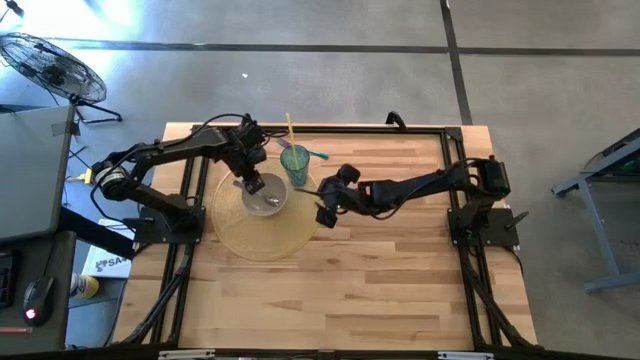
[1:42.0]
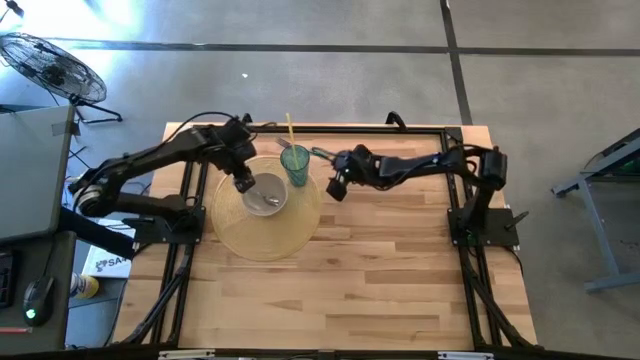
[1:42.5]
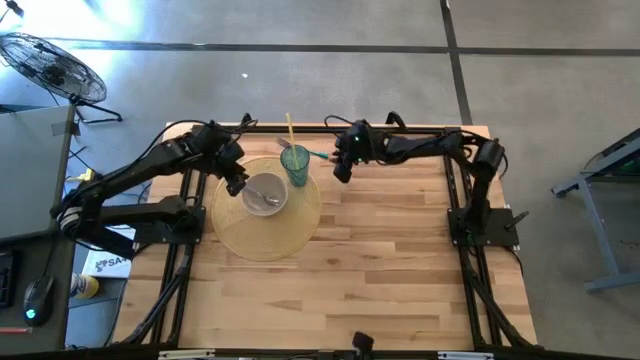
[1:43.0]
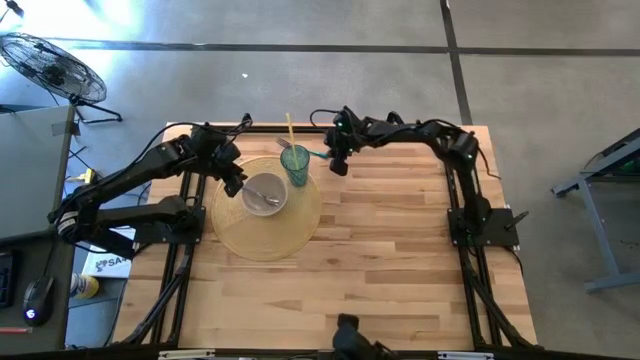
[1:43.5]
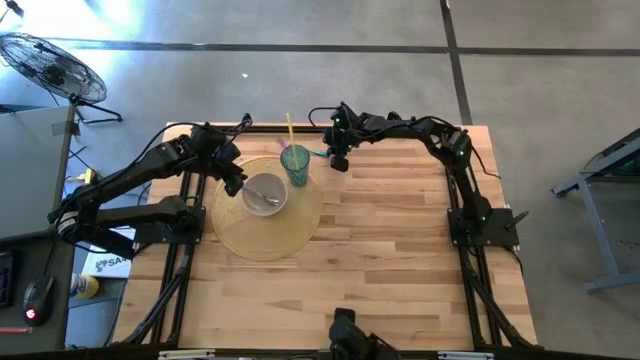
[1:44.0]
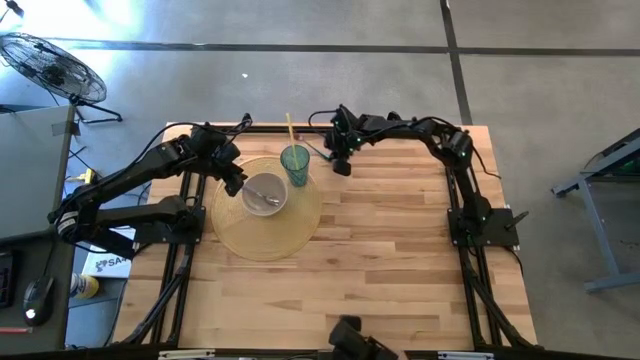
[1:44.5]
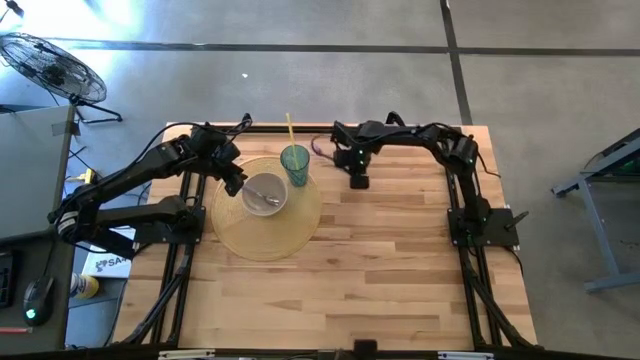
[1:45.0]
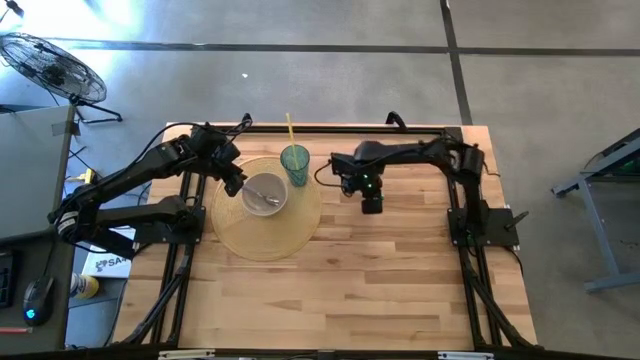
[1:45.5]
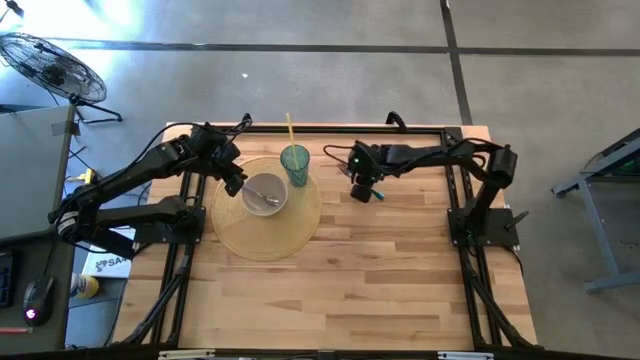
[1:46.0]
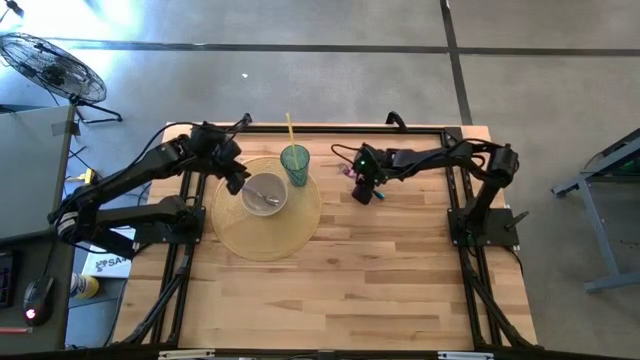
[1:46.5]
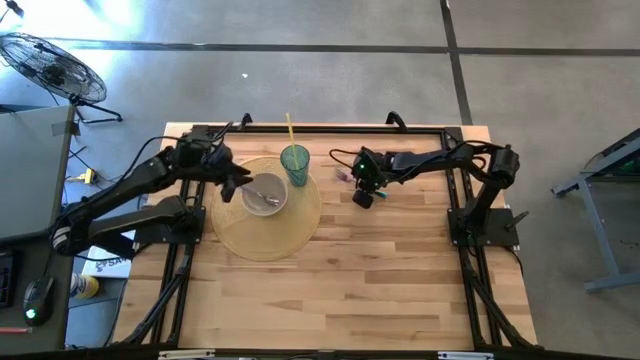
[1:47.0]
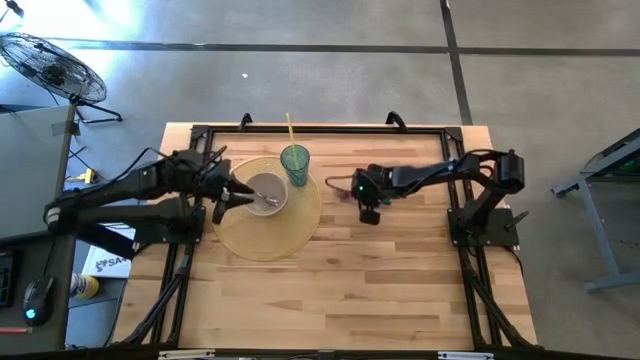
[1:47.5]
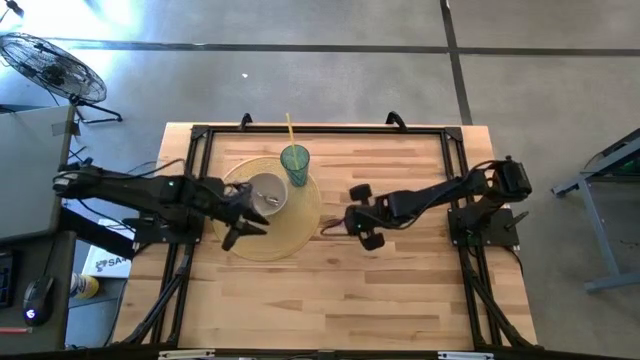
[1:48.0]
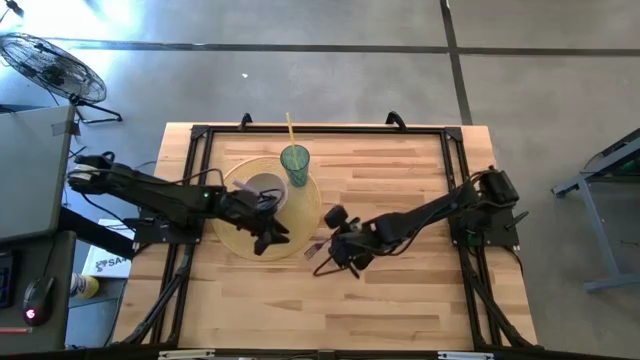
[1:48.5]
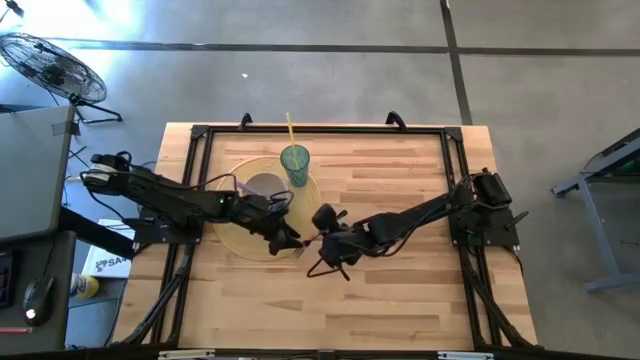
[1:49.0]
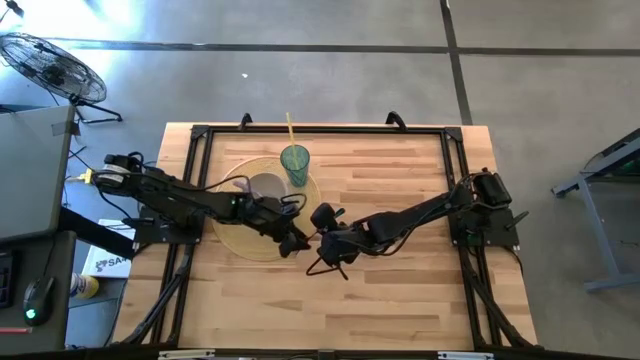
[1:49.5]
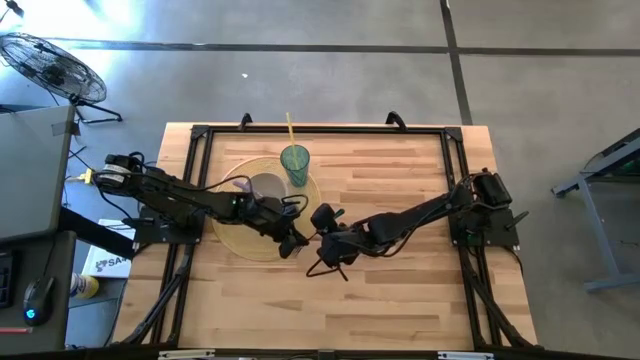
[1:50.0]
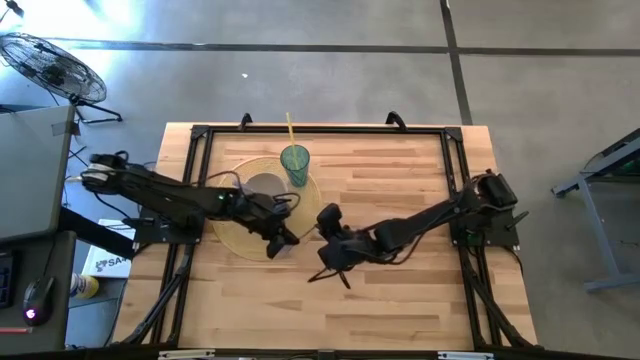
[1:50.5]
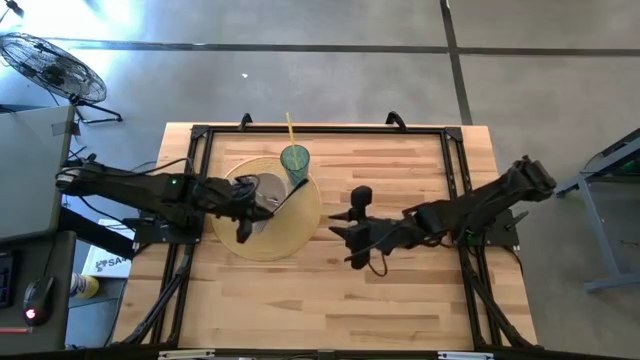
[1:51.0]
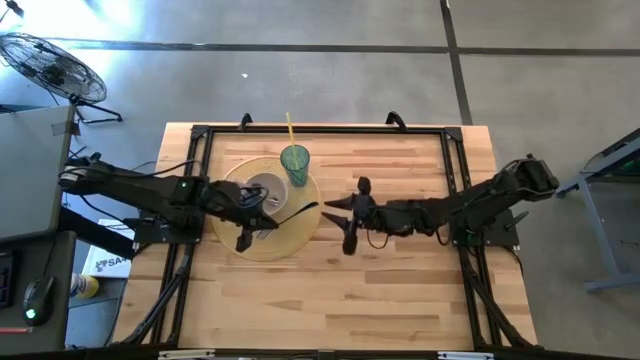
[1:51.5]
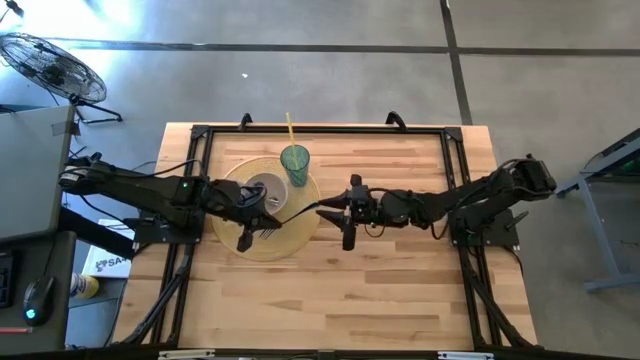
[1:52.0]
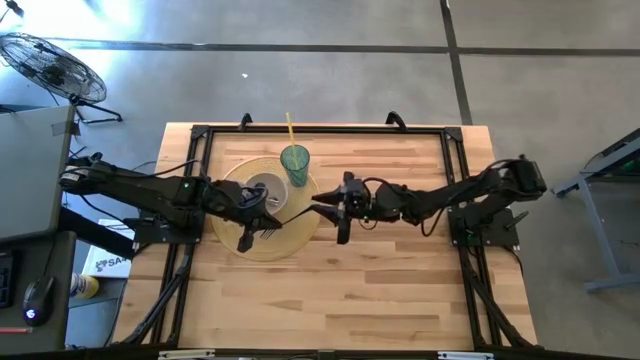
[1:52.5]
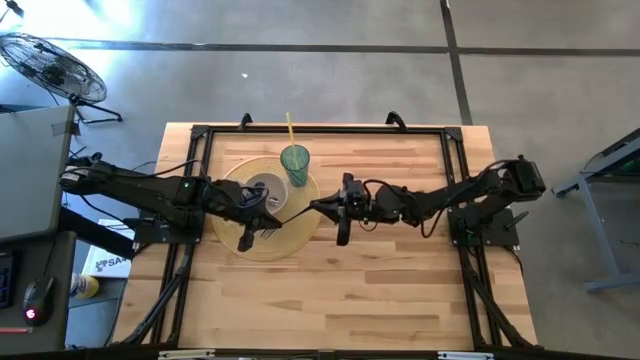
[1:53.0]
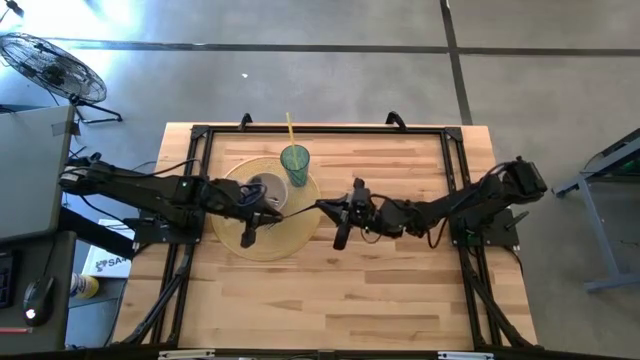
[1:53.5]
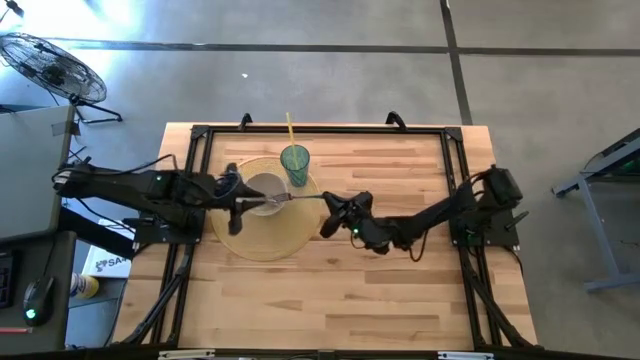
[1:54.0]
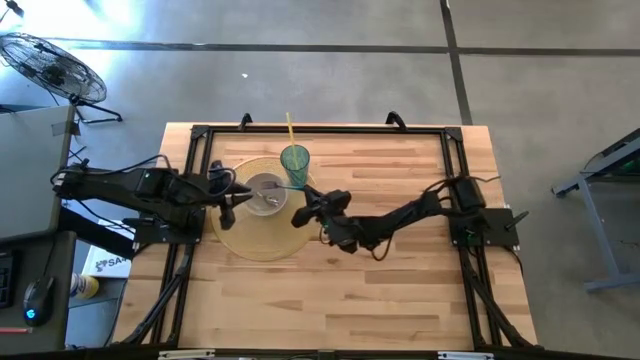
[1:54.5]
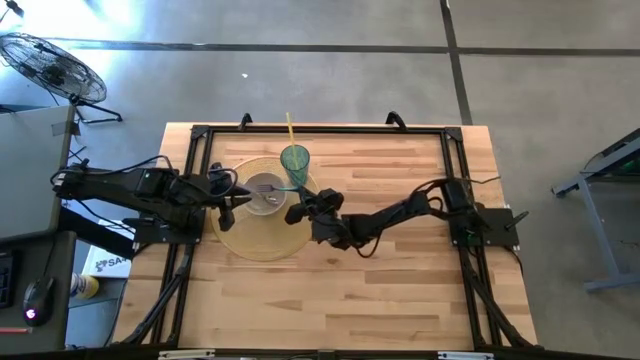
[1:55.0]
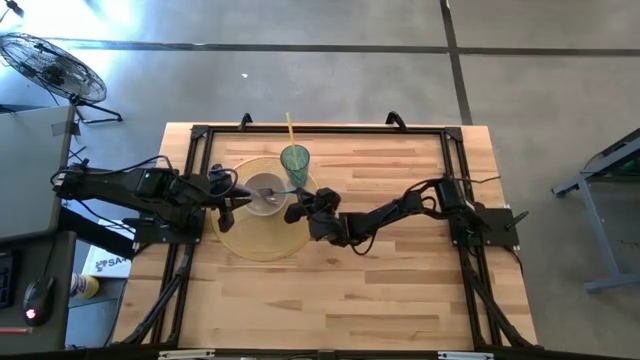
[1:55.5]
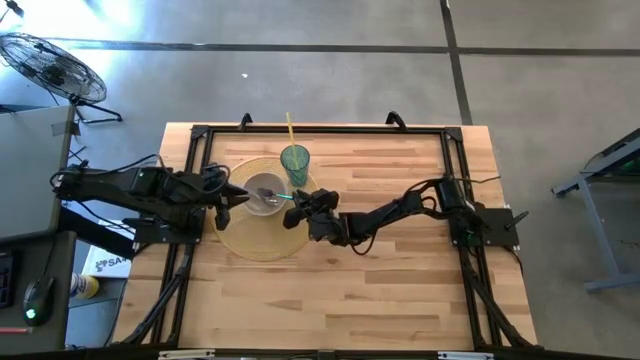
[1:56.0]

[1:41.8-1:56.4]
Task: Pick & Place Utensil
Put the blue fork into the white bowl

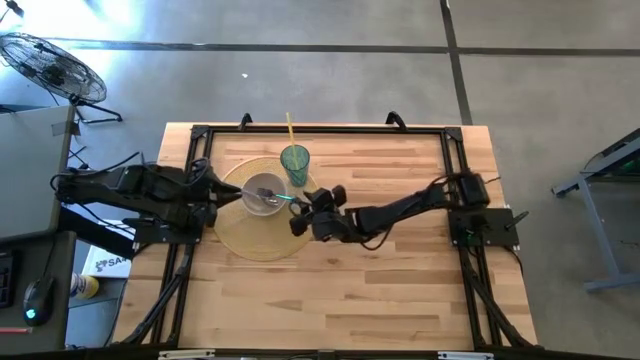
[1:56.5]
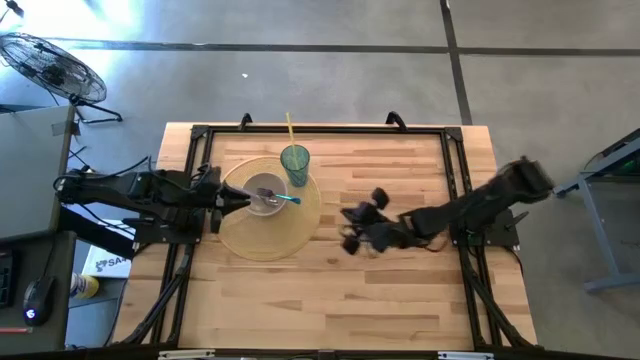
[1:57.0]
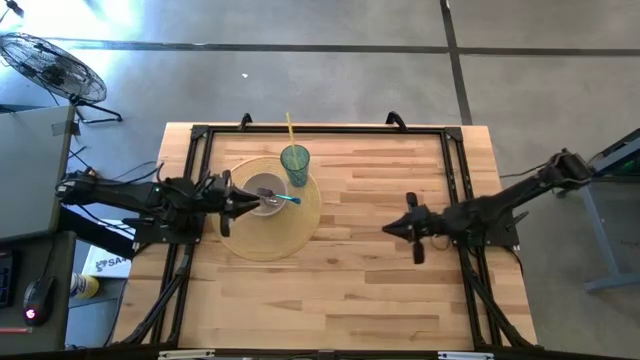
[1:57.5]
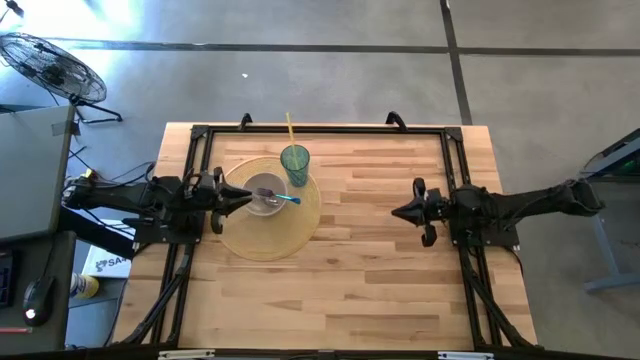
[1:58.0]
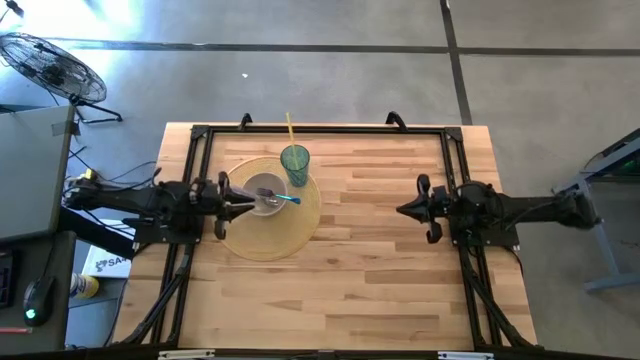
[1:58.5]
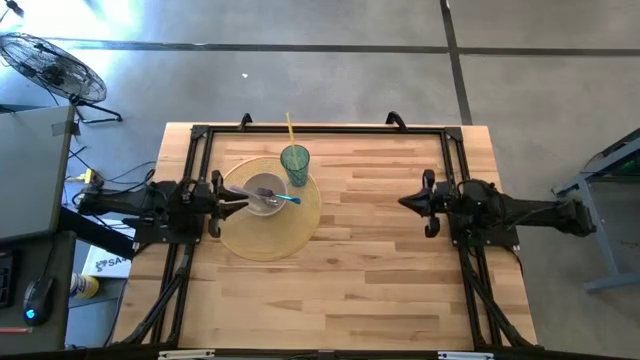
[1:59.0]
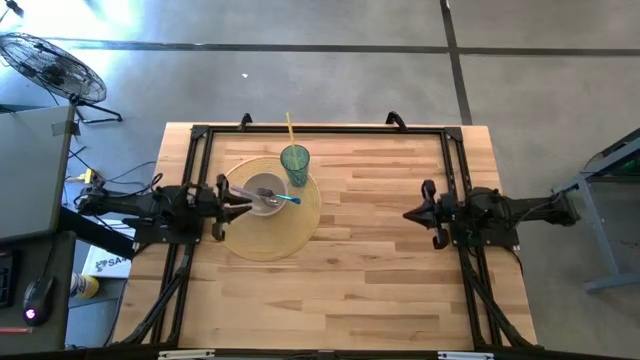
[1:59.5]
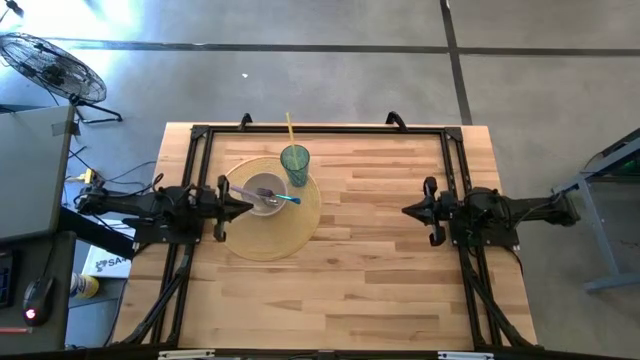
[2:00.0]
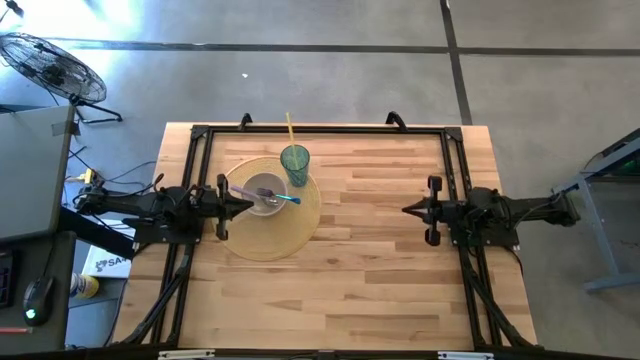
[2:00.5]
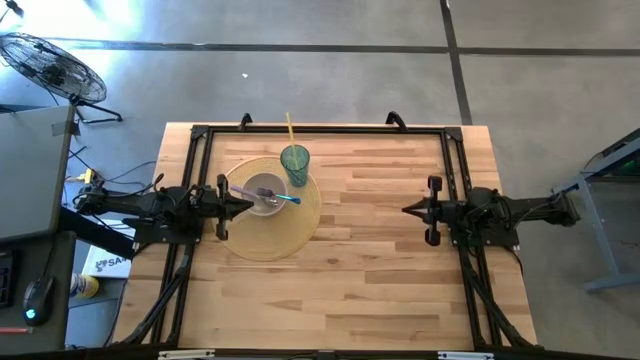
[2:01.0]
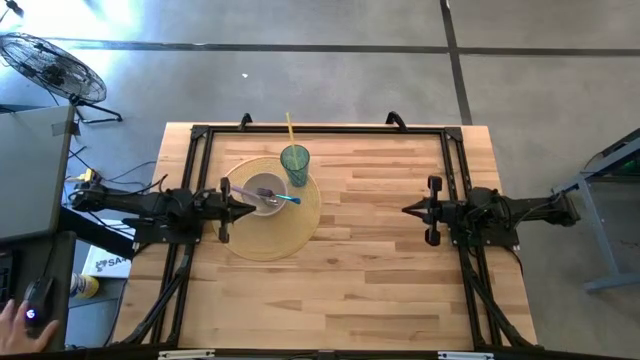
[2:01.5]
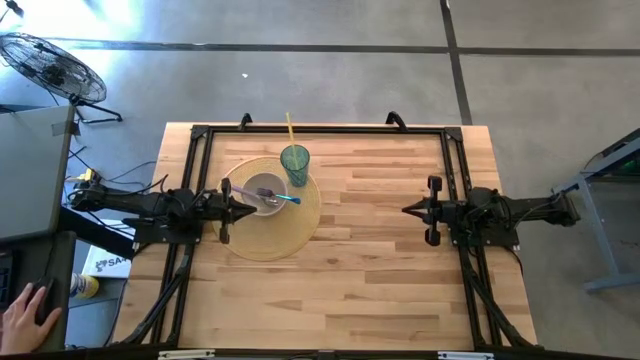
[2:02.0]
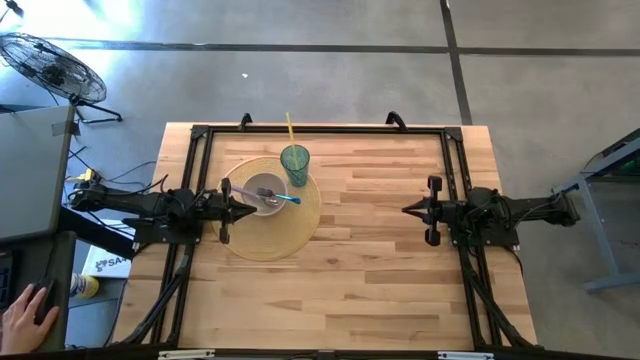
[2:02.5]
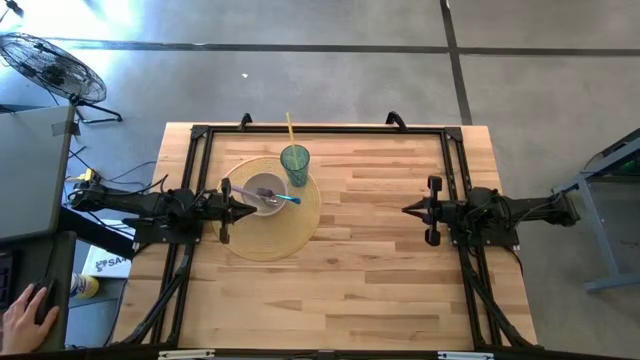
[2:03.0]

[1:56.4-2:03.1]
Return to Home Position
